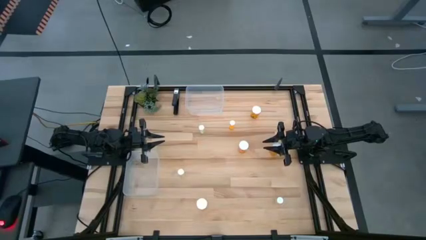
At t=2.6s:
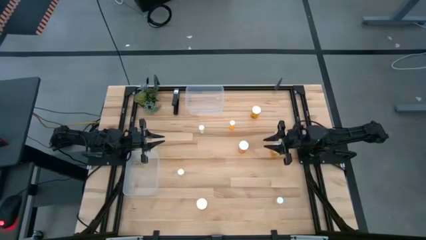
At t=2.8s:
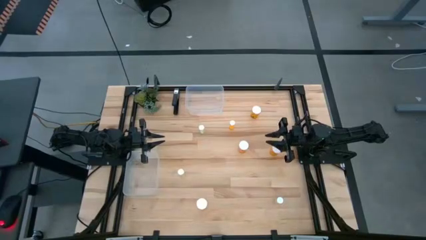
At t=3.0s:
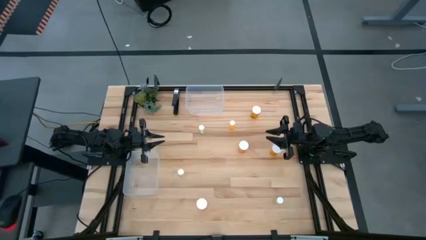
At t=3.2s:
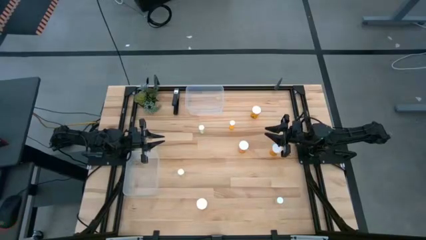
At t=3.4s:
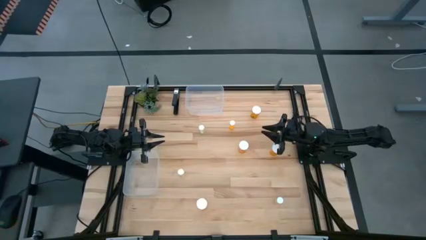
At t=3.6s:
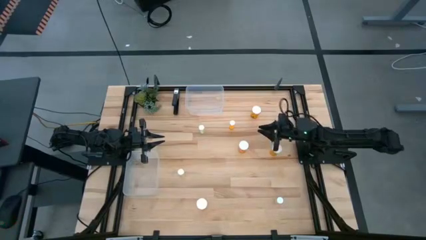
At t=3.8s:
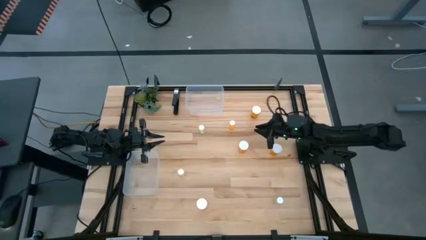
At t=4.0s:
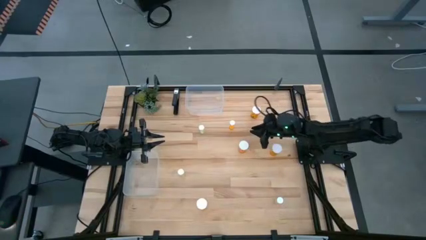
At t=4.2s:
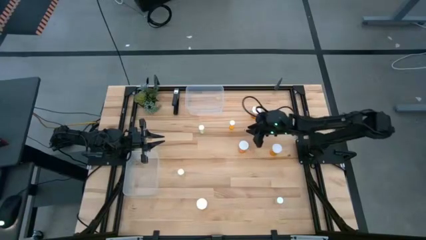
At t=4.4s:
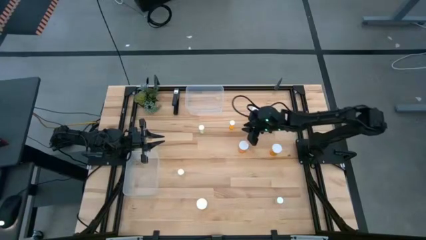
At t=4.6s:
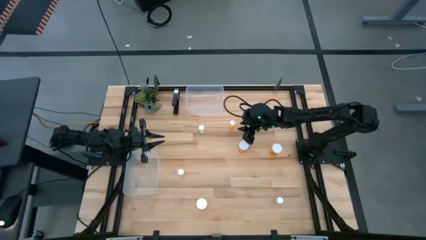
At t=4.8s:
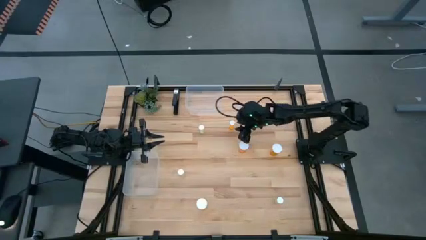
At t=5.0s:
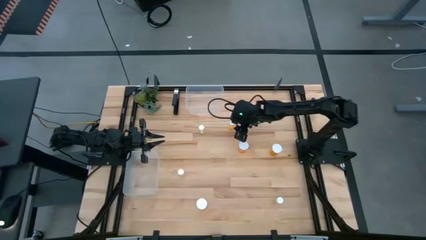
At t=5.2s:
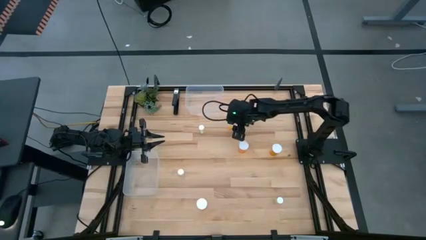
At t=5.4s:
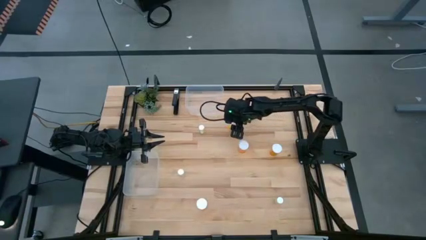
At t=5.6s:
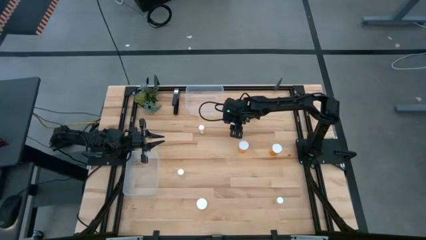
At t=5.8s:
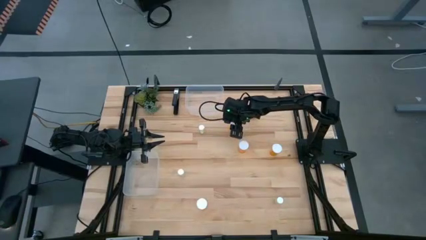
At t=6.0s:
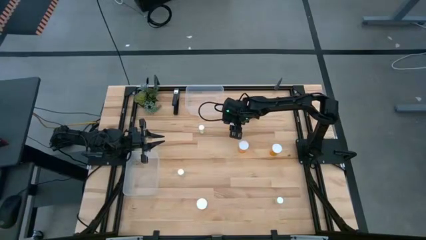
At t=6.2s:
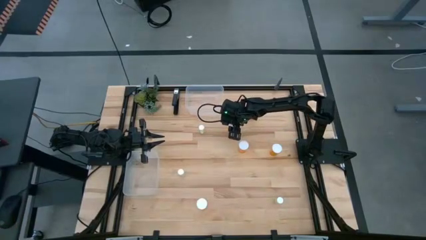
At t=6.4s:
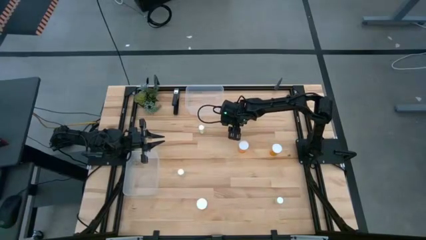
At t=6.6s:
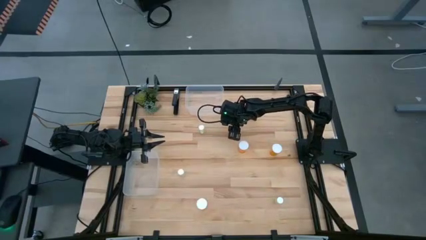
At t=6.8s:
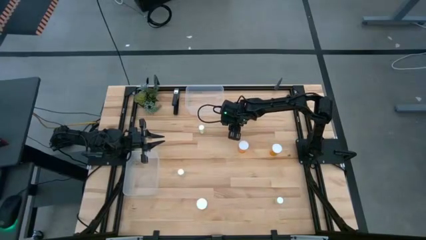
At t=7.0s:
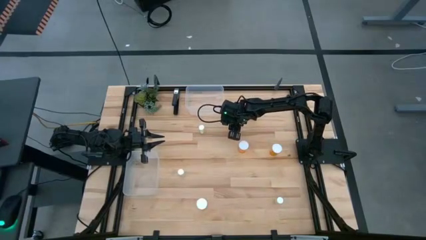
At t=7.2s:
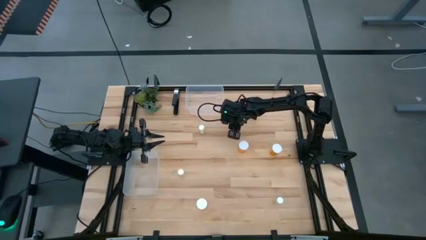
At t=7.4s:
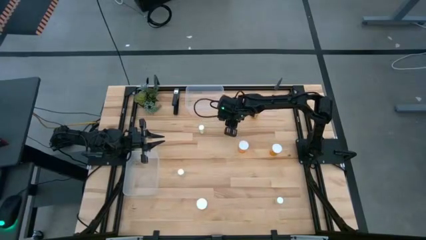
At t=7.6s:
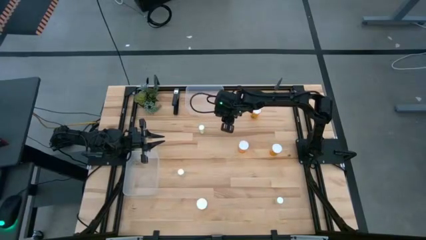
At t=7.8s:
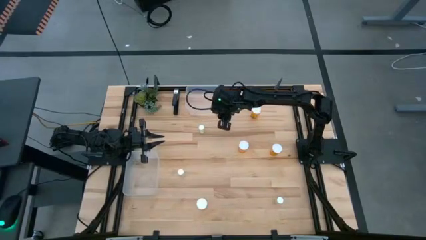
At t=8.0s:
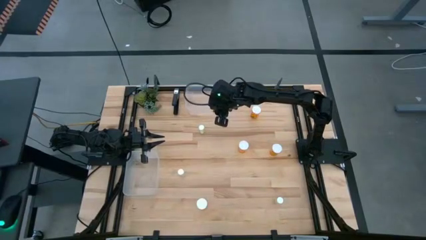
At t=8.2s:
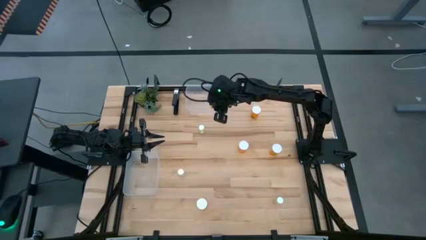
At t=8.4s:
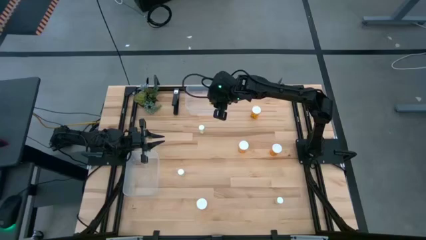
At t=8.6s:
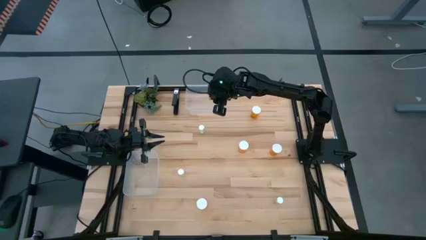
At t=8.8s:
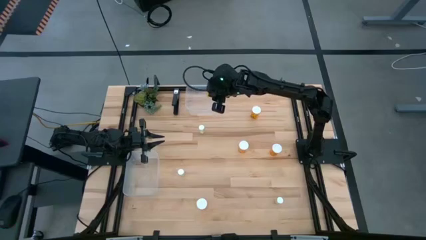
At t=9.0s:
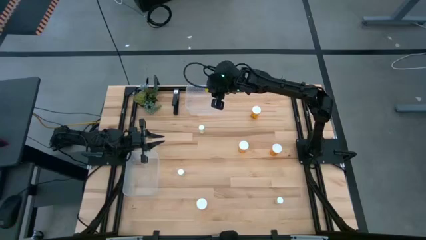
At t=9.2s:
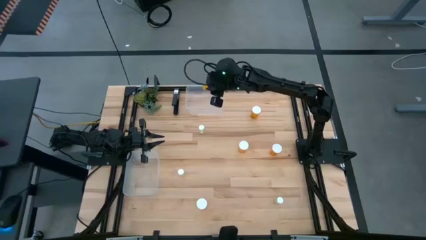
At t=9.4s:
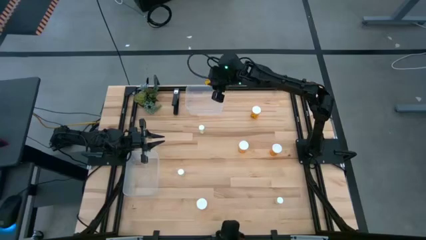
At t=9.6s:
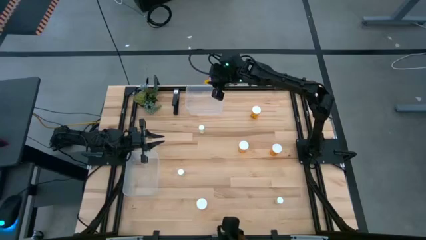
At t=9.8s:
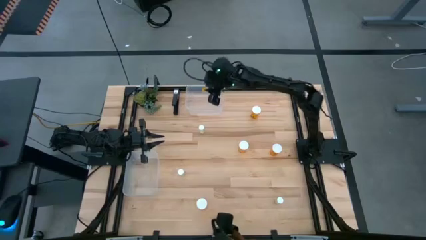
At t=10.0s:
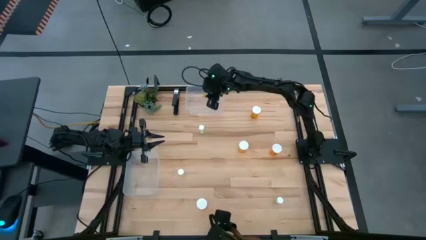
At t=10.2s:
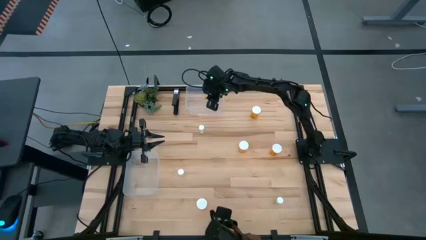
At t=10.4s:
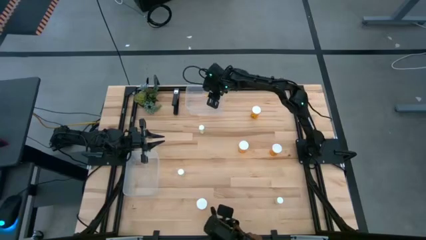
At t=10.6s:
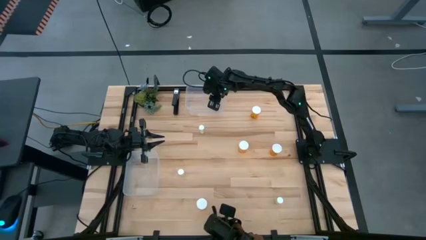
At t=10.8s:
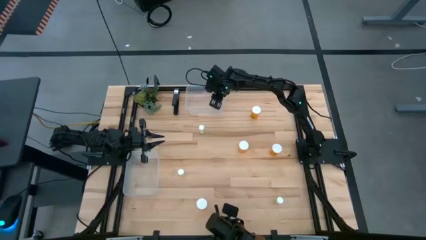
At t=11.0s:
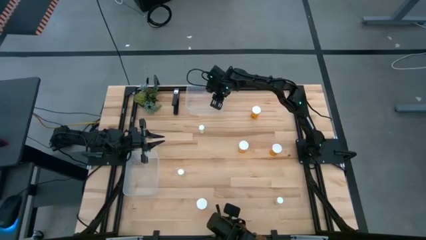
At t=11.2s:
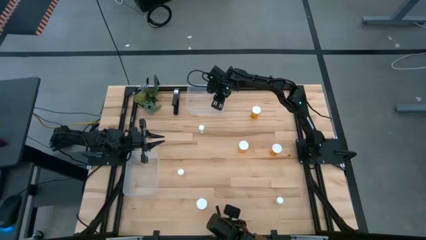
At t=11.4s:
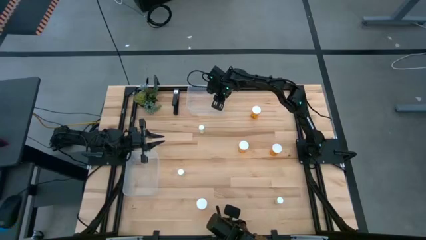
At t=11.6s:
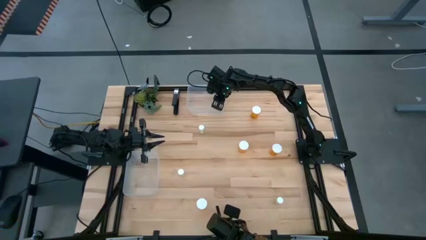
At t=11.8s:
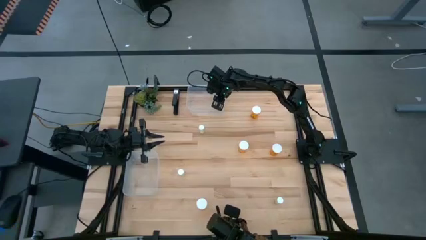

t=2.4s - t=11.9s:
Task: Pick and place medicine bottles into bin by pill shape (circle, oval)
Put the small orange pill bottle into the top transparent bin

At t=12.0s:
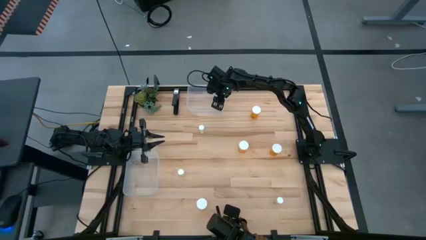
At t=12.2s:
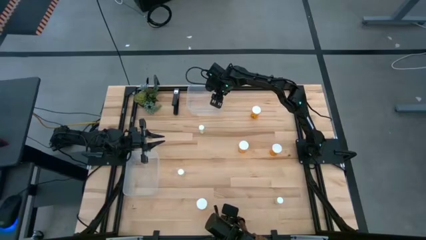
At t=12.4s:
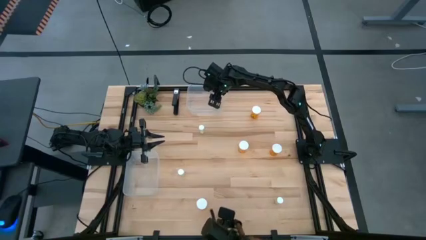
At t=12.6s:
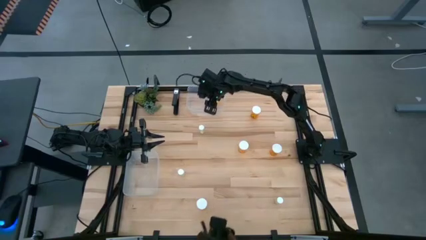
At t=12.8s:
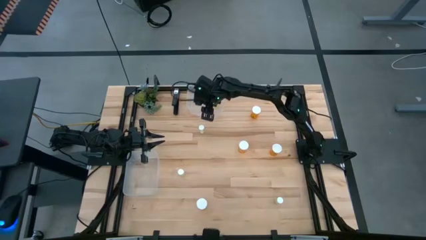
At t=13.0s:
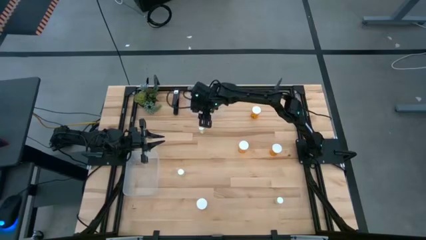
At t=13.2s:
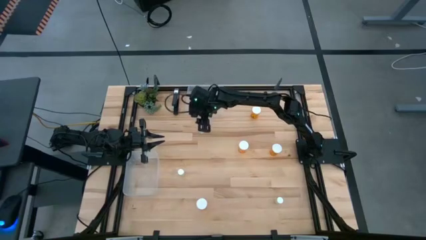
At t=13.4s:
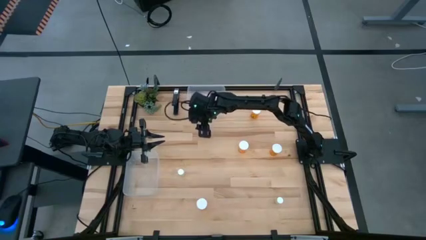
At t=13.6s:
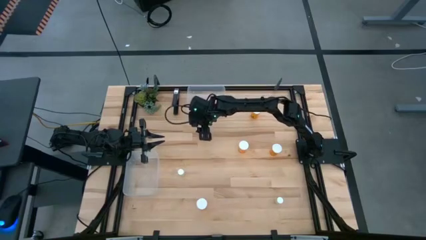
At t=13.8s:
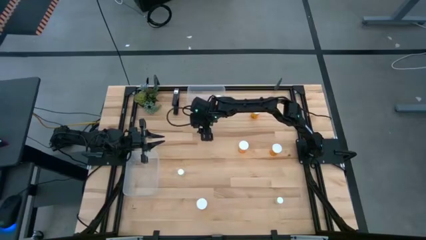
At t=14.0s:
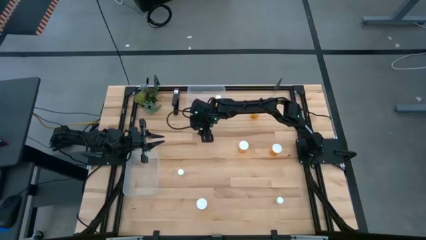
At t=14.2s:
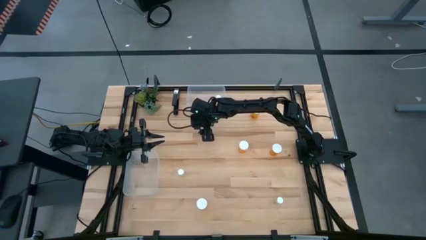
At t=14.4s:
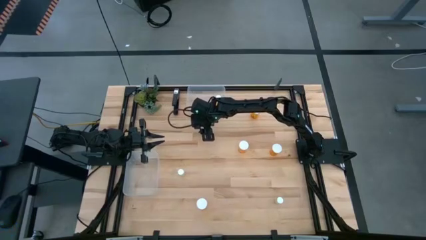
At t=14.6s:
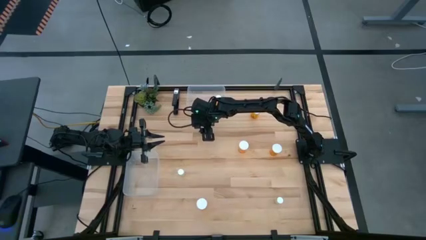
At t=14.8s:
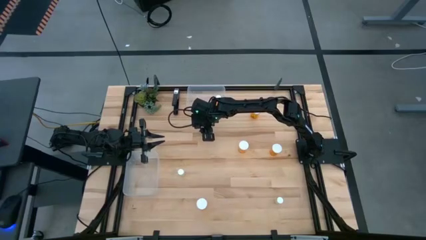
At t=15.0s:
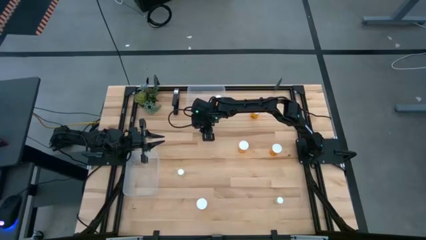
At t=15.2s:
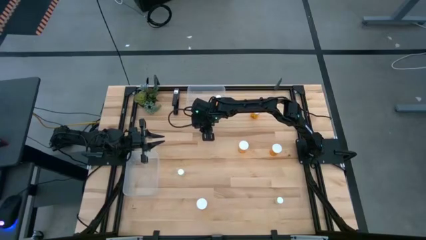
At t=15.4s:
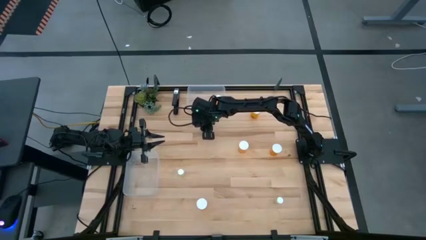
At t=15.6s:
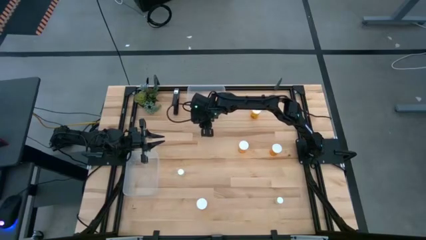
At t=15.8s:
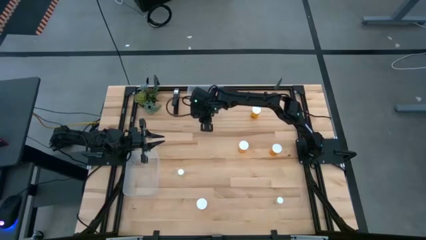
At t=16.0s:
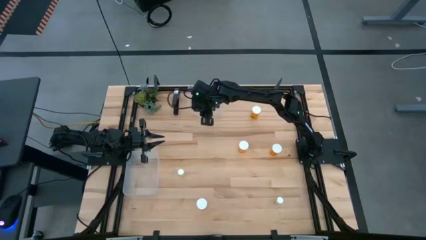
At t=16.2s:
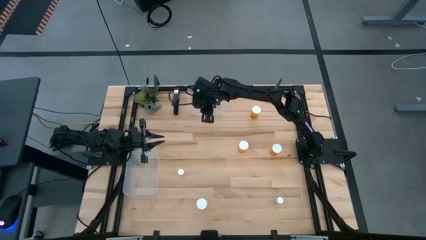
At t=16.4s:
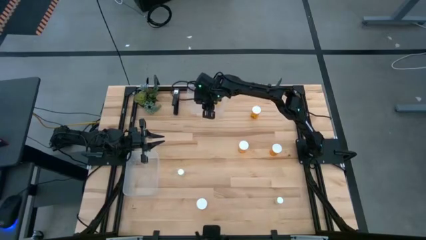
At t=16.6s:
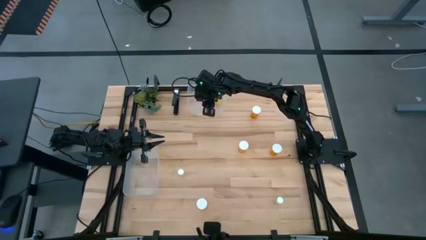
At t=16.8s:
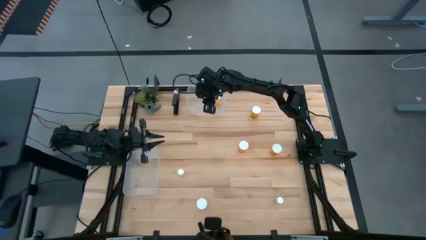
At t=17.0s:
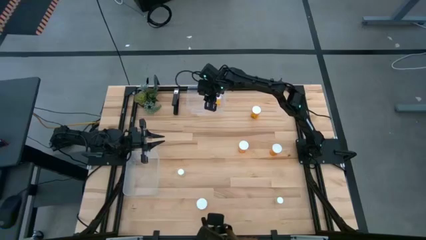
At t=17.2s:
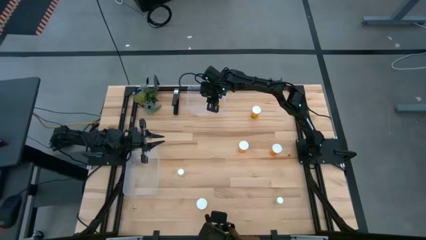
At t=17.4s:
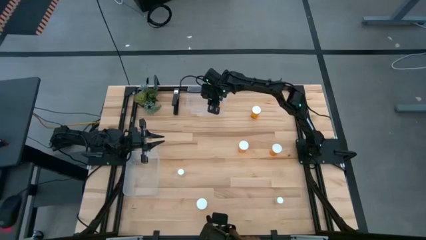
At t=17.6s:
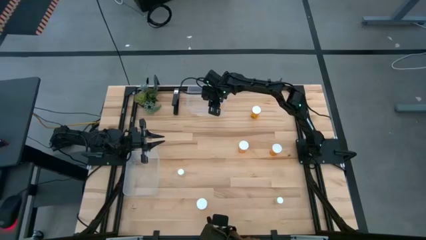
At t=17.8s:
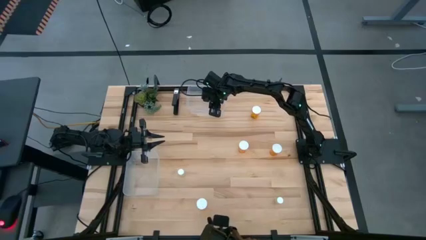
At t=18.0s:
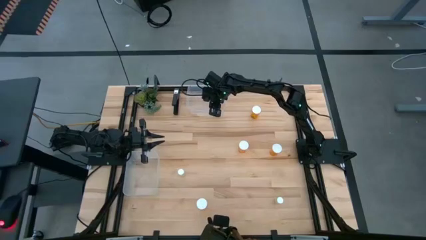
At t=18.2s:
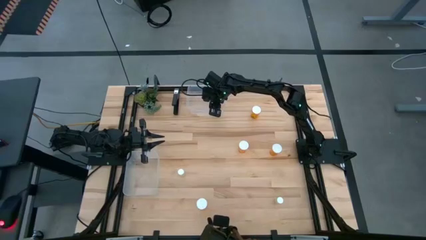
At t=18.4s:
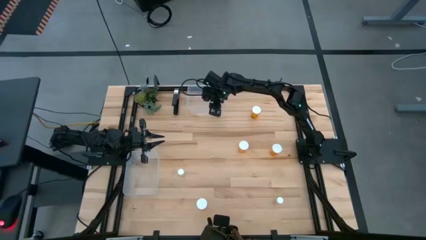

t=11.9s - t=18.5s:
Put the top left small yellow pill bottle into the top transparent bin
